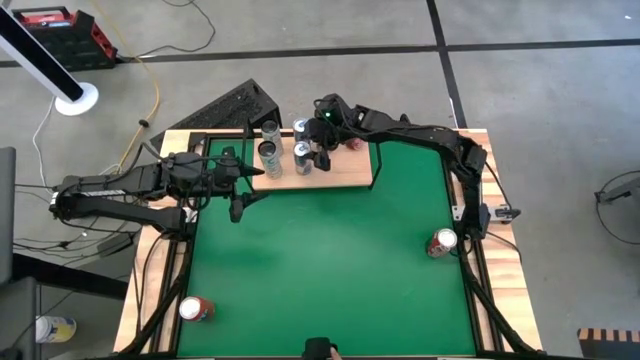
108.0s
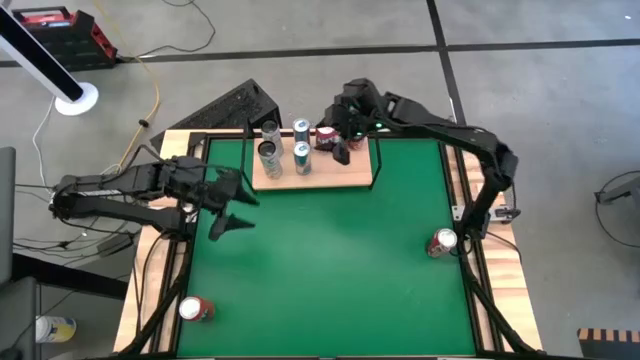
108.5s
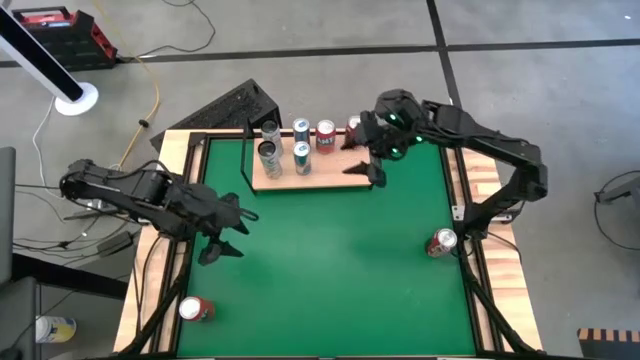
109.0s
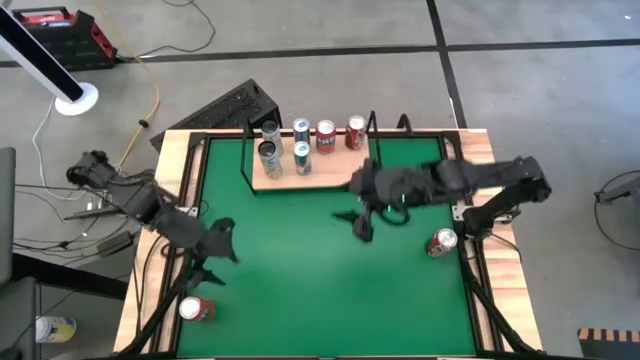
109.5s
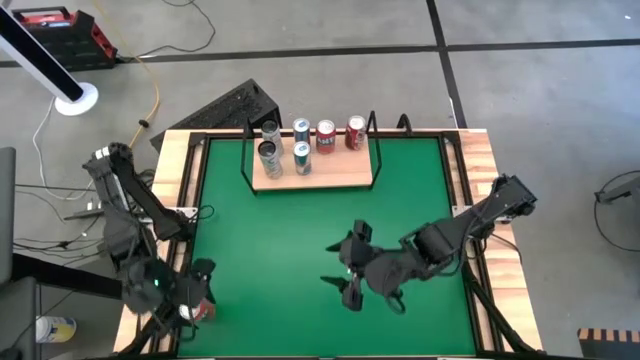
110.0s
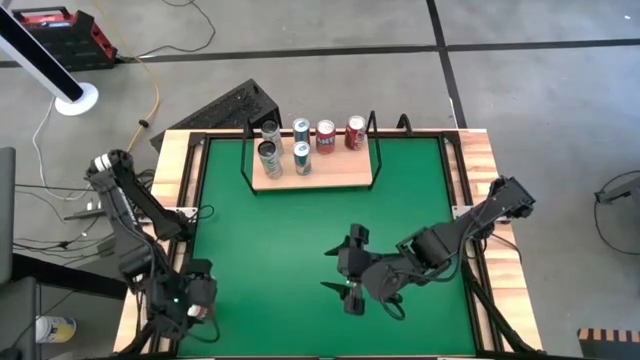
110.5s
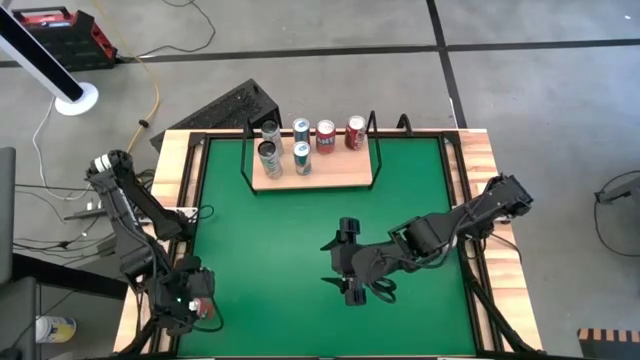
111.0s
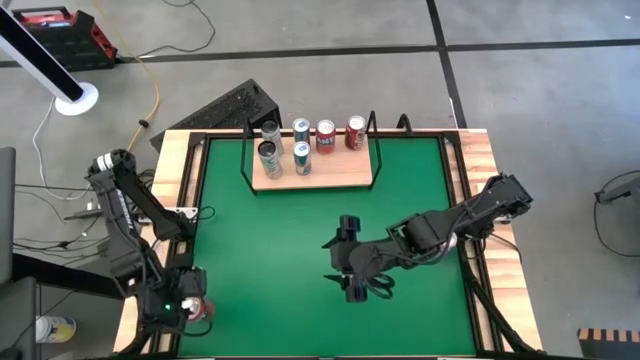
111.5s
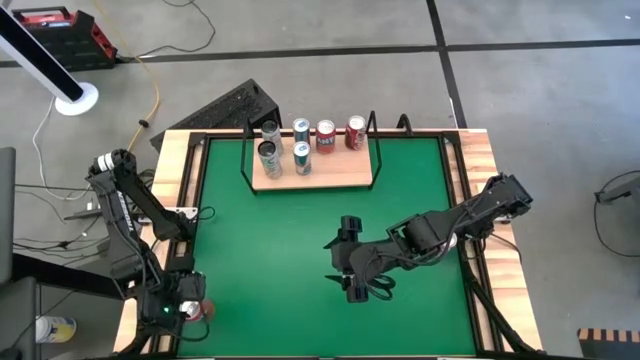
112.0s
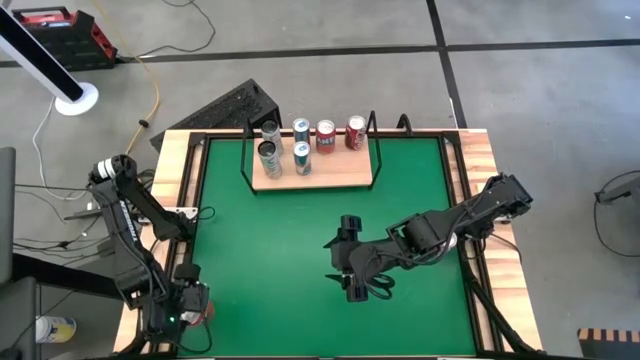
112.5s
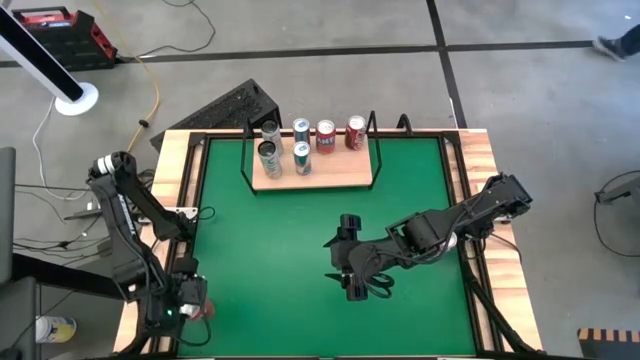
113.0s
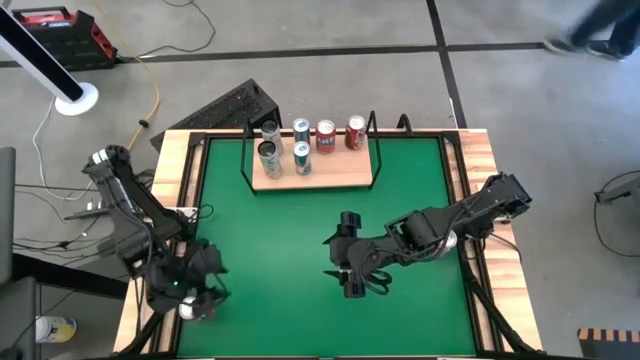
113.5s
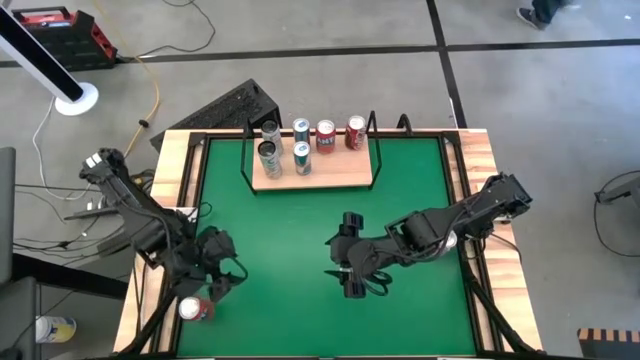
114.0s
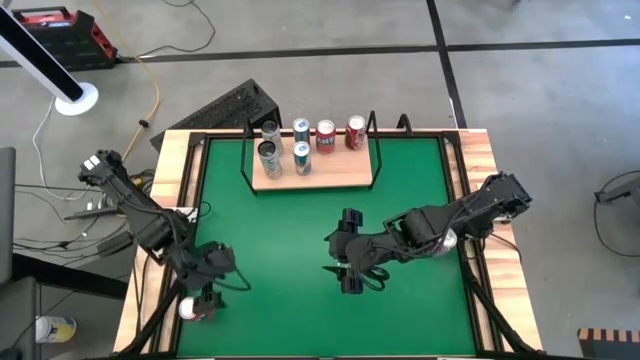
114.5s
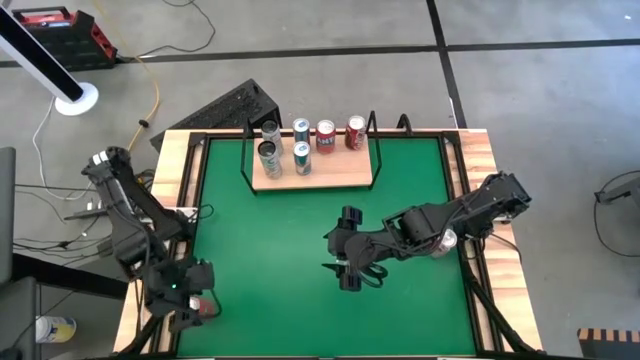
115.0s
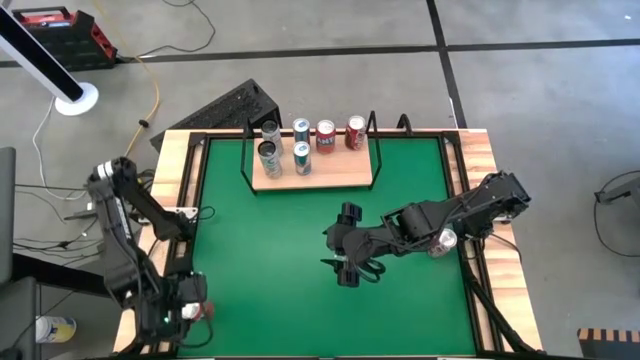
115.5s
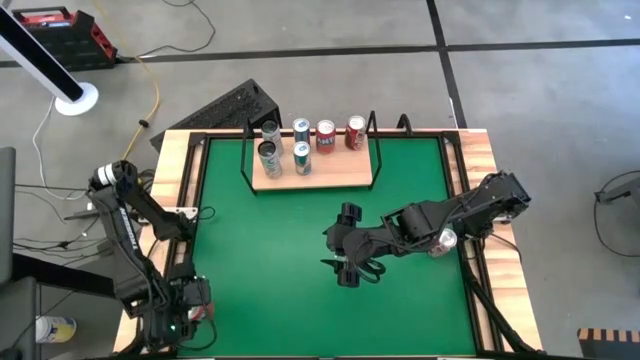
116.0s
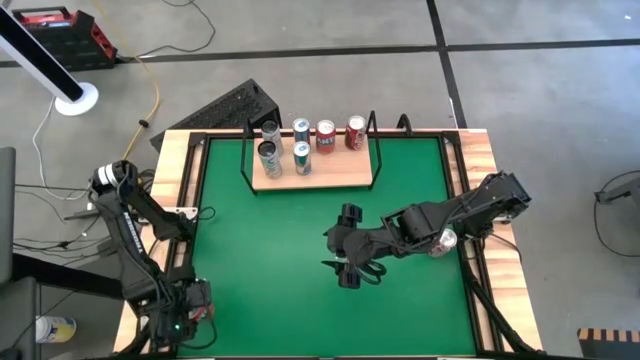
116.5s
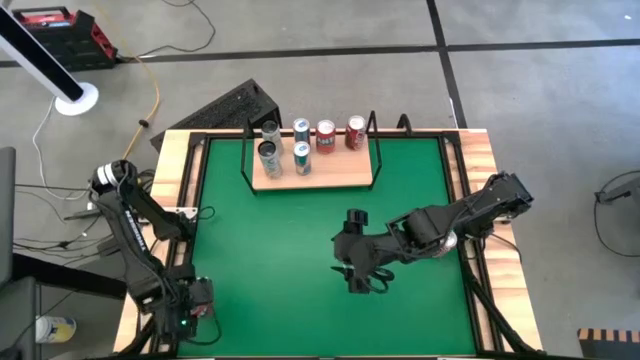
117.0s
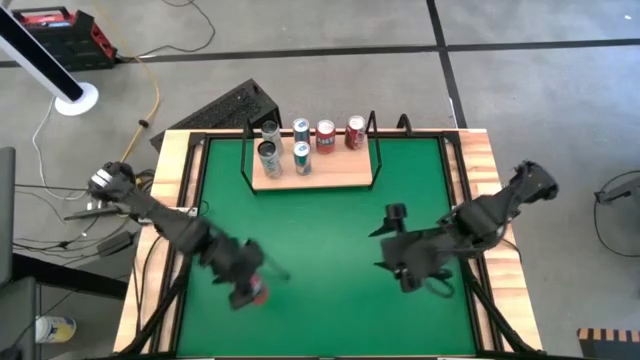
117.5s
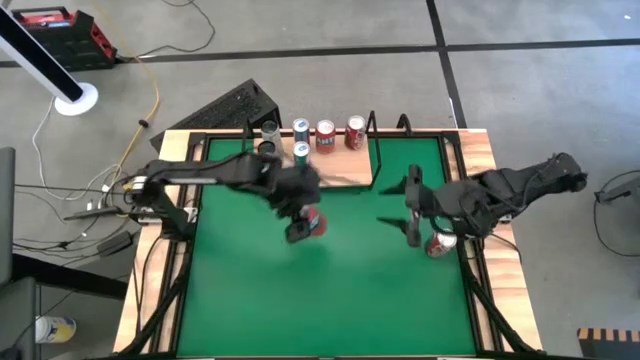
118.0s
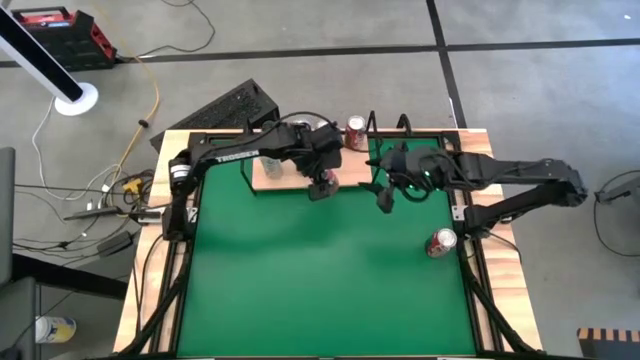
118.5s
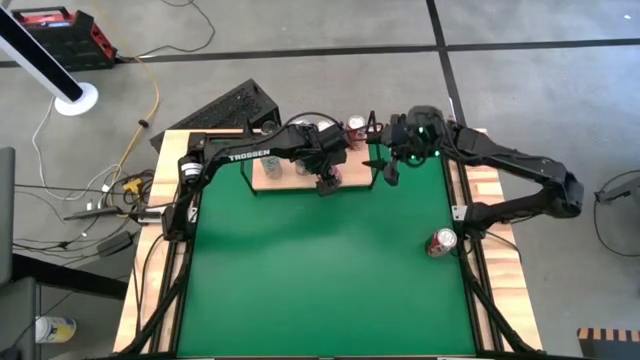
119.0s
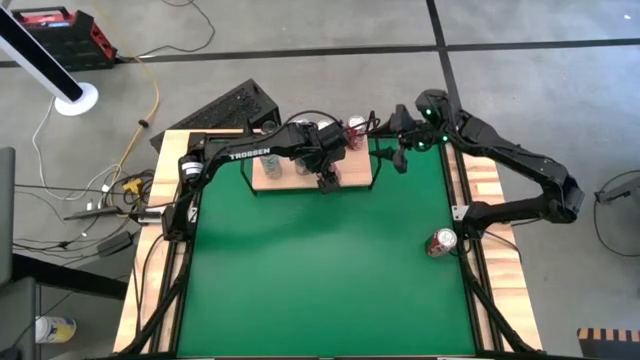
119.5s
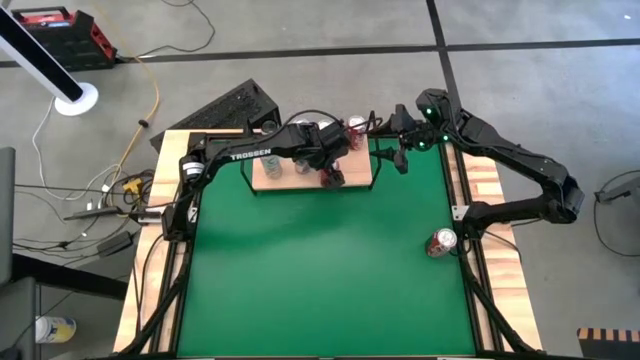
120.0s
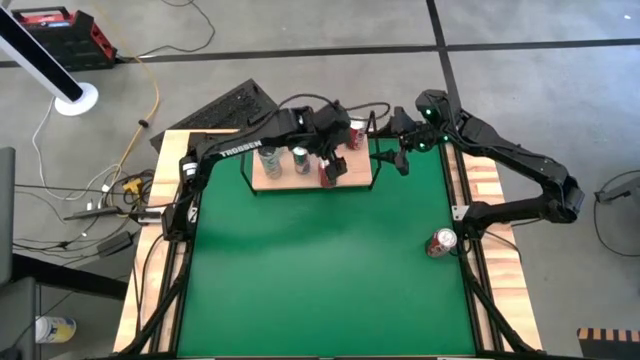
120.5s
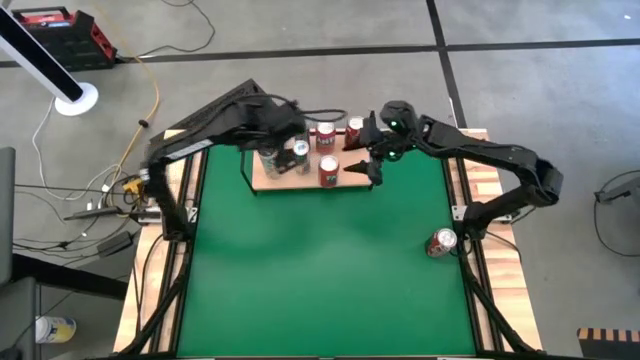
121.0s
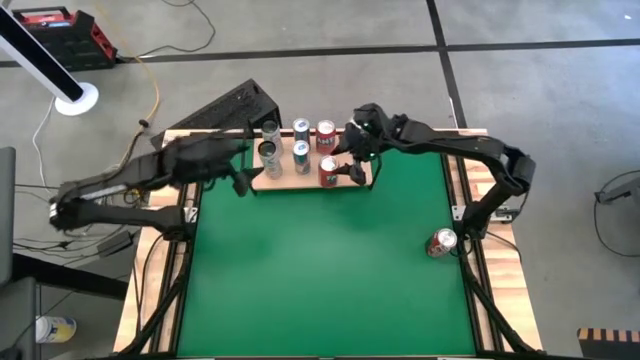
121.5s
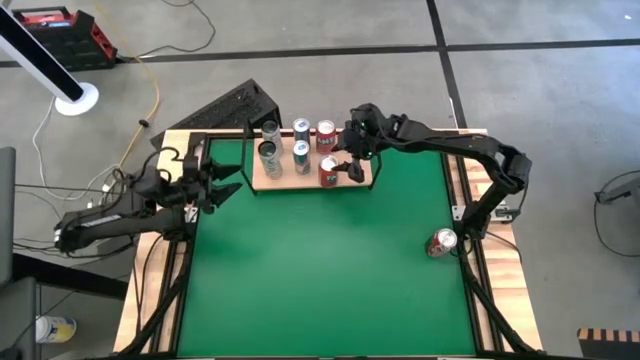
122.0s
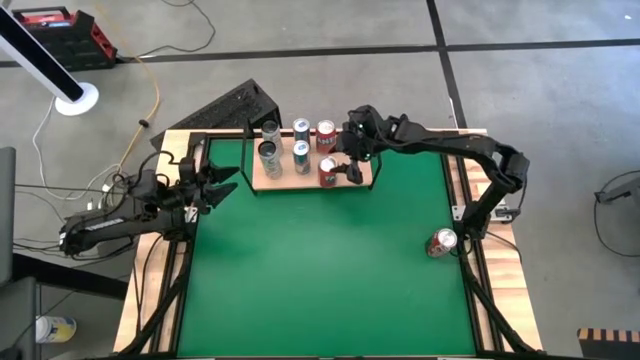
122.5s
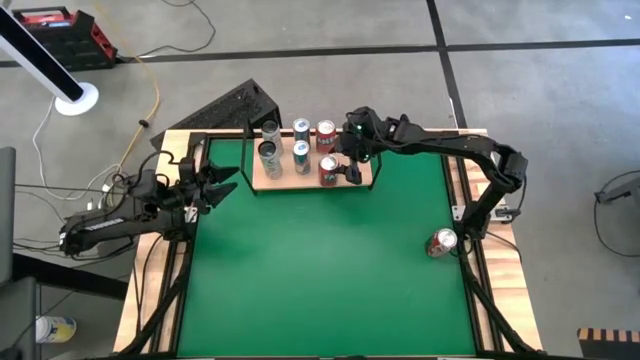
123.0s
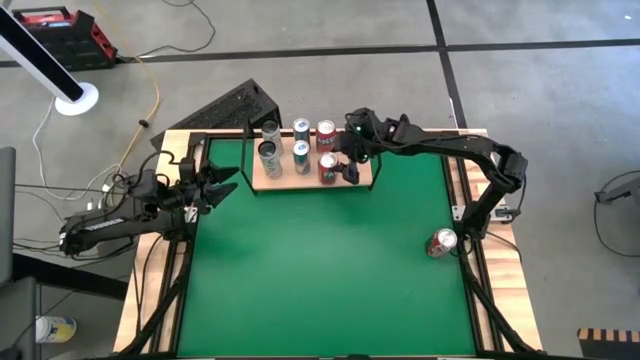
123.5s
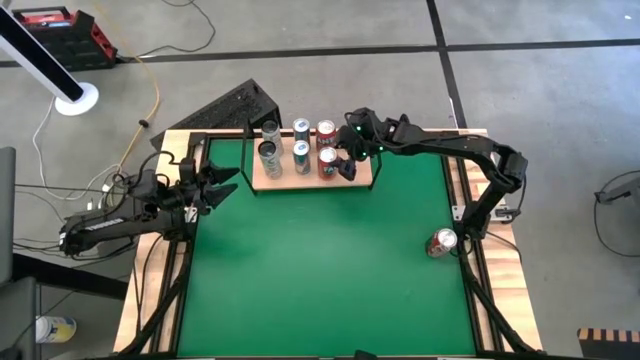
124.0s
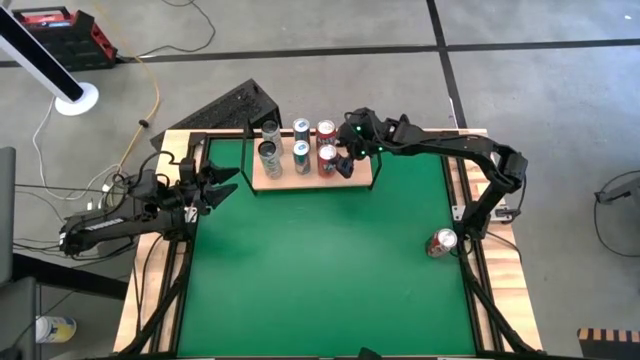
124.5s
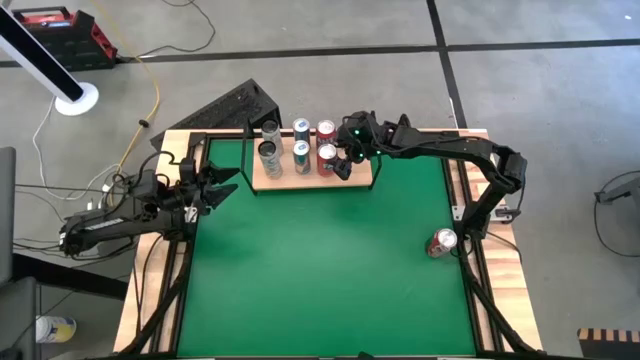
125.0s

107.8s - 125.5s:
Task: Place canned beverage on shelf
Put the orange soda can on the shelf aligned with the other orange soda can

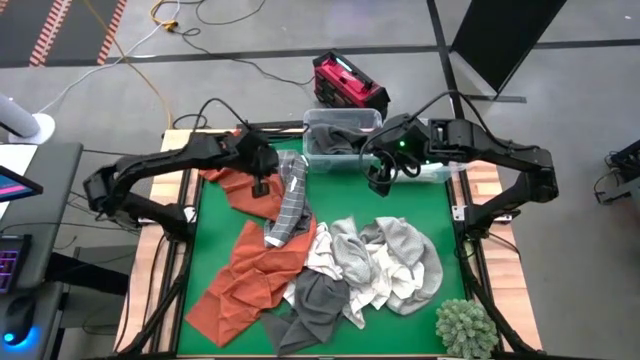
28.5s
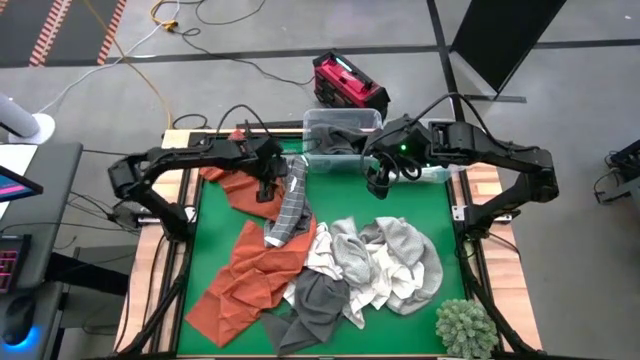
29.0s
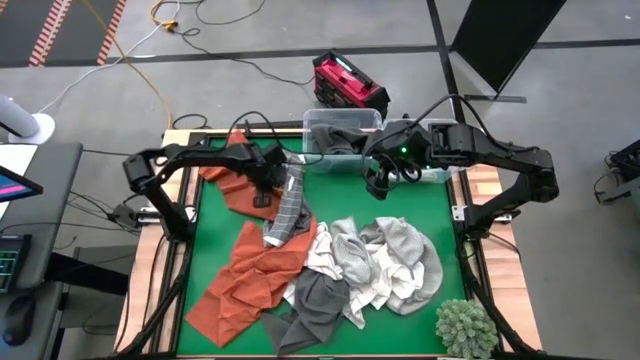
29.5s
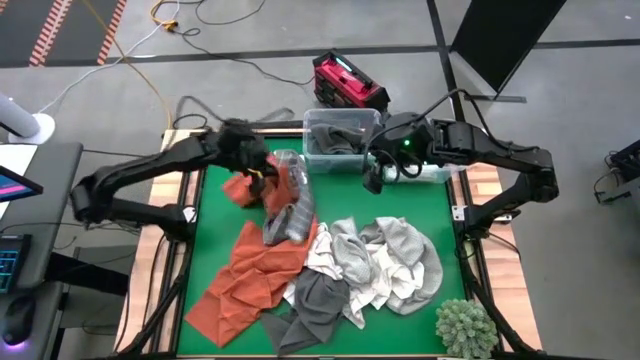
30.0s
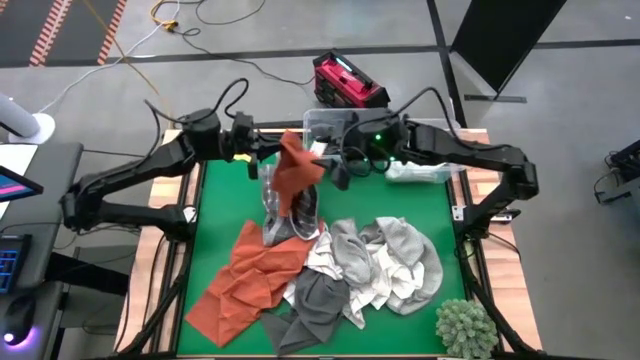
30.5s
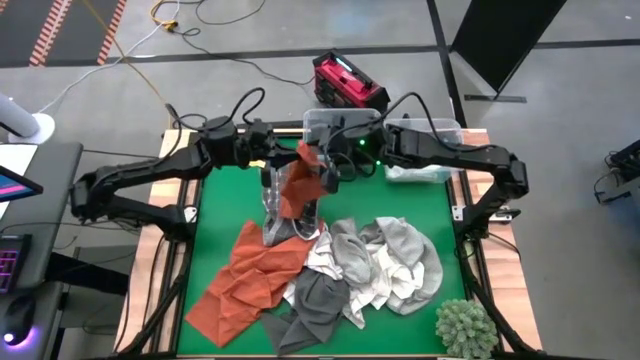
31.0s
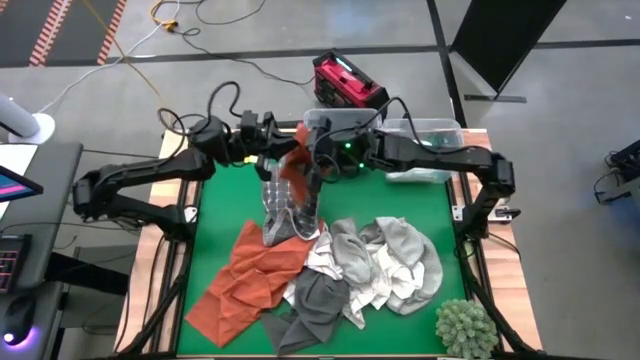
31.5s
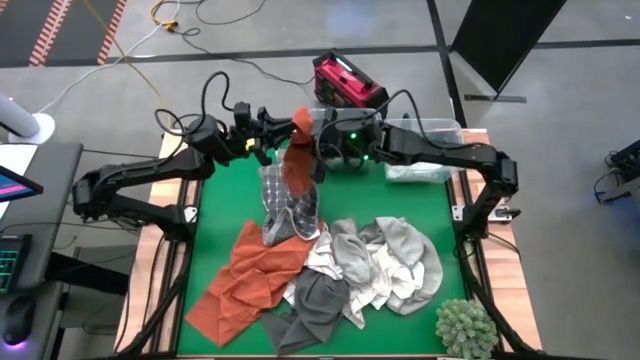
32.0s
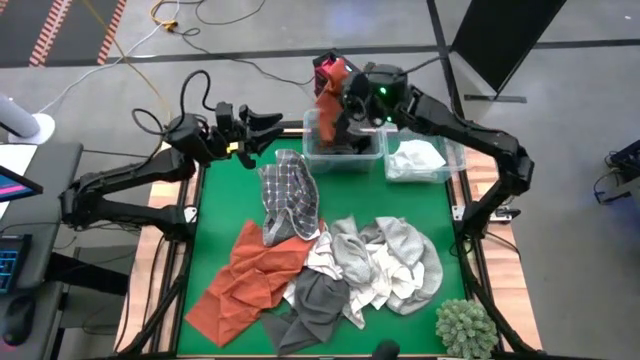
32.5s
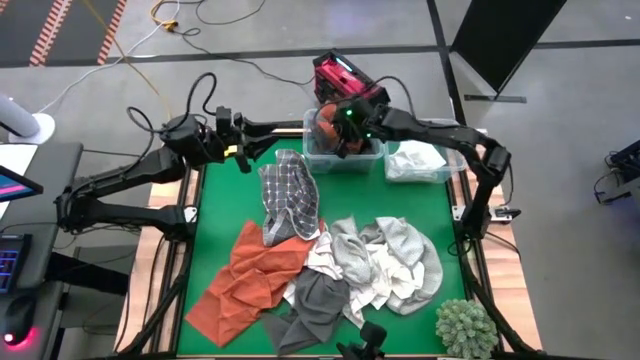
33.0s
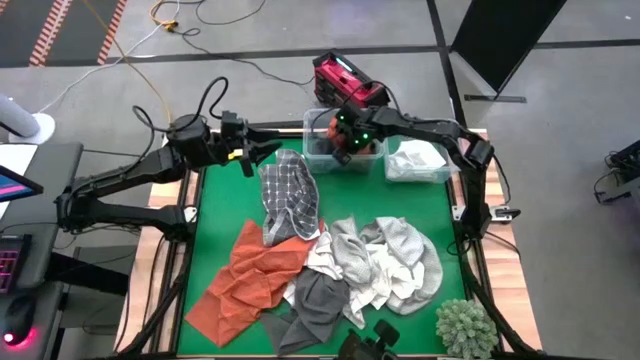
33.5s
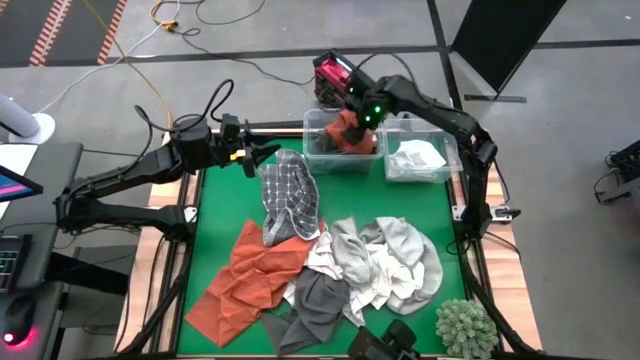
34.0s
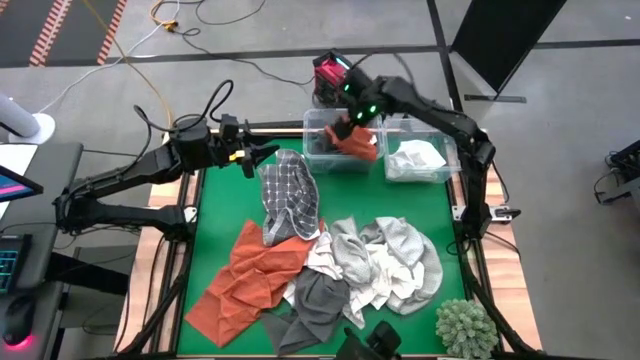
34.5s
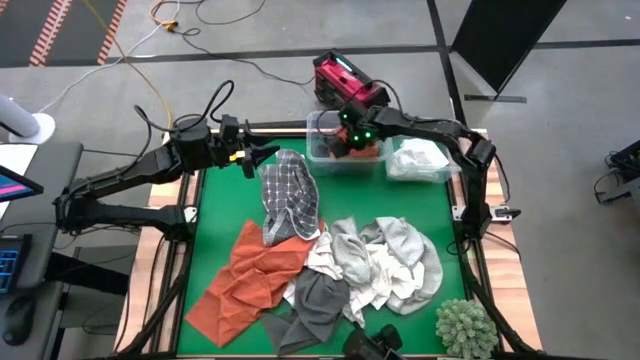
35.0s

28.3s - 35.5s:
Task: Sort towels by color in basket
Put the orange towel into the left transparent bin
